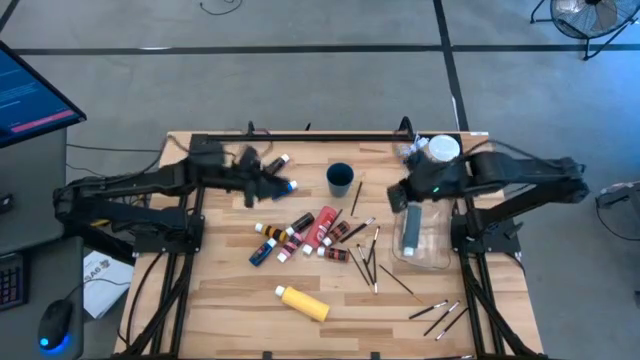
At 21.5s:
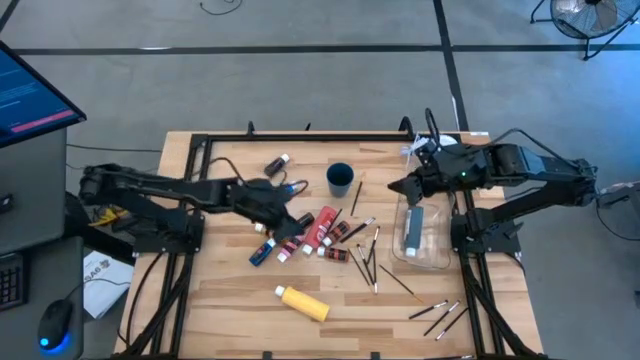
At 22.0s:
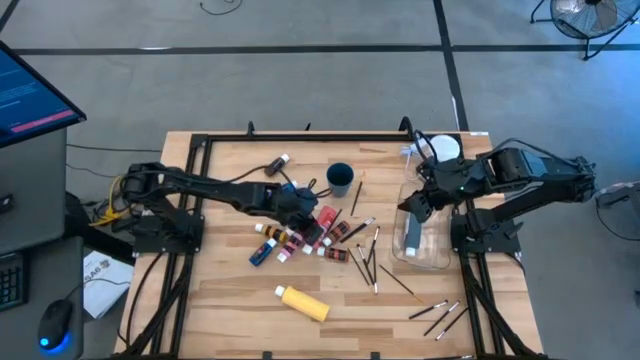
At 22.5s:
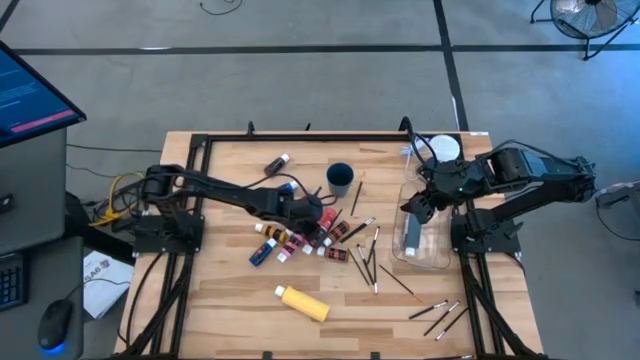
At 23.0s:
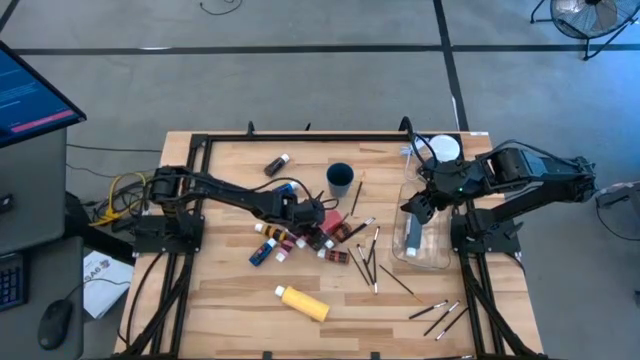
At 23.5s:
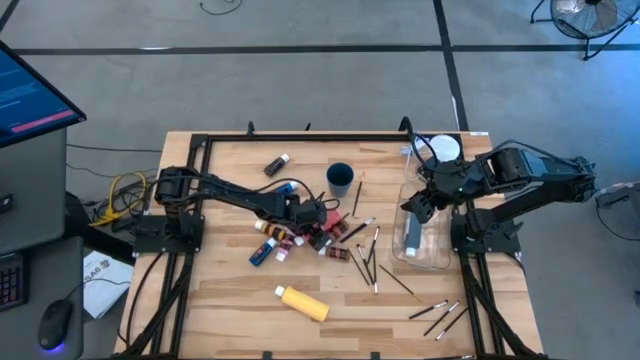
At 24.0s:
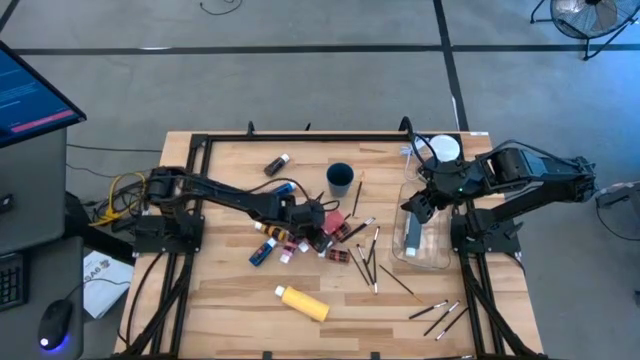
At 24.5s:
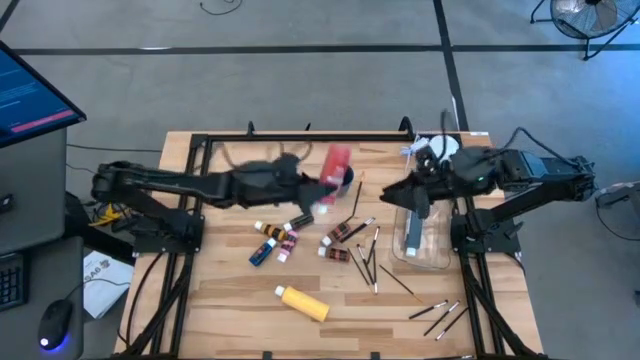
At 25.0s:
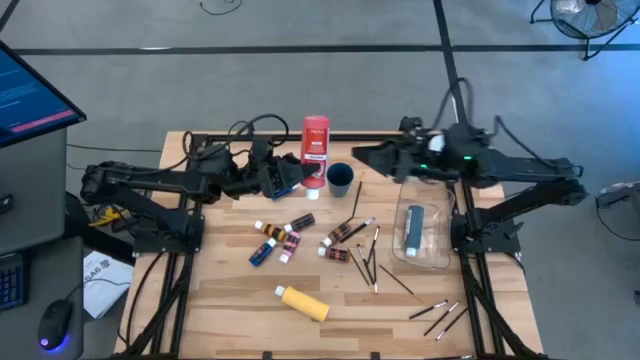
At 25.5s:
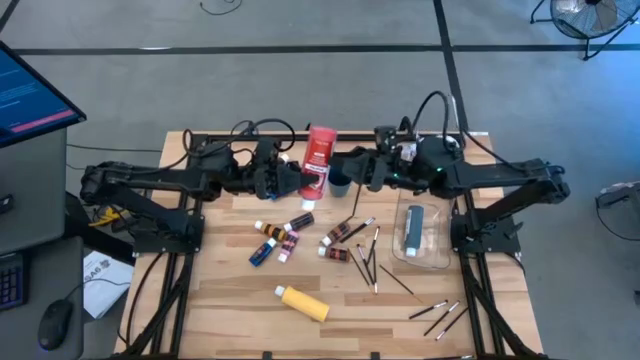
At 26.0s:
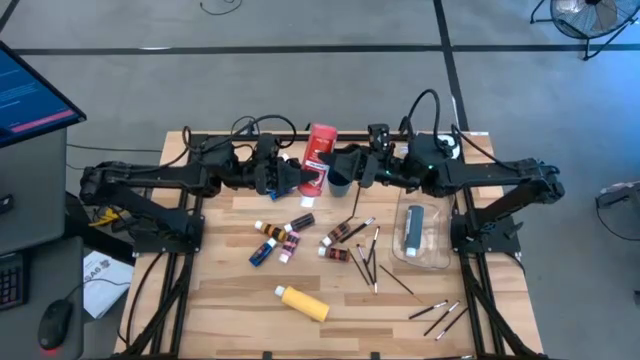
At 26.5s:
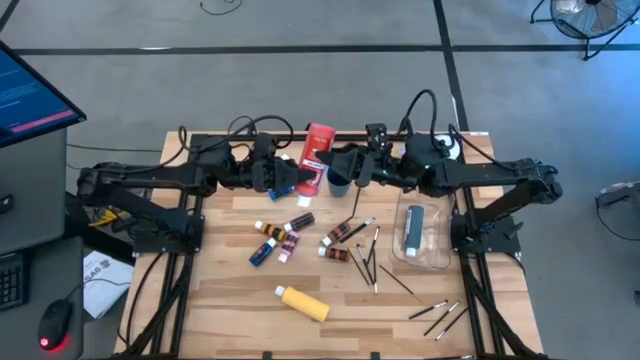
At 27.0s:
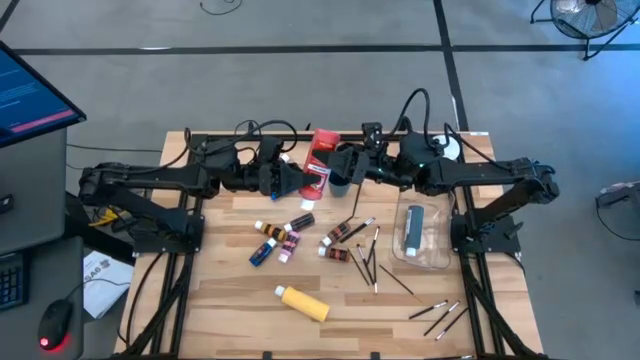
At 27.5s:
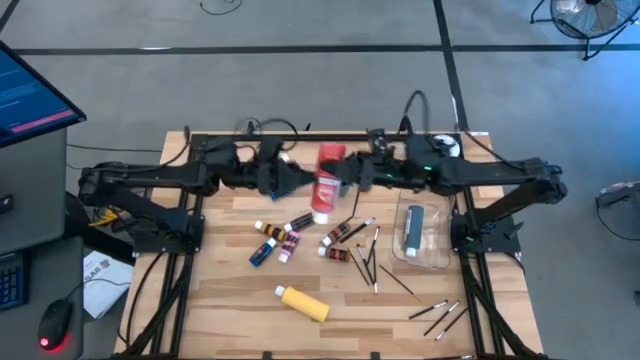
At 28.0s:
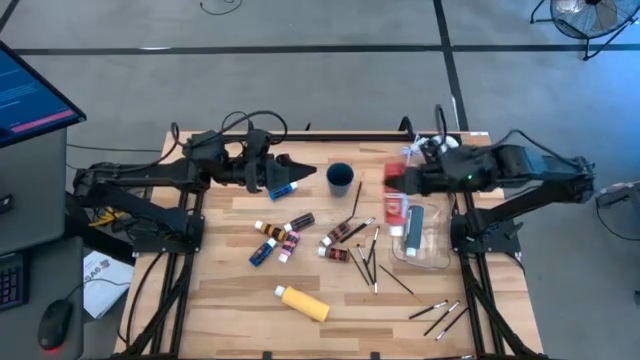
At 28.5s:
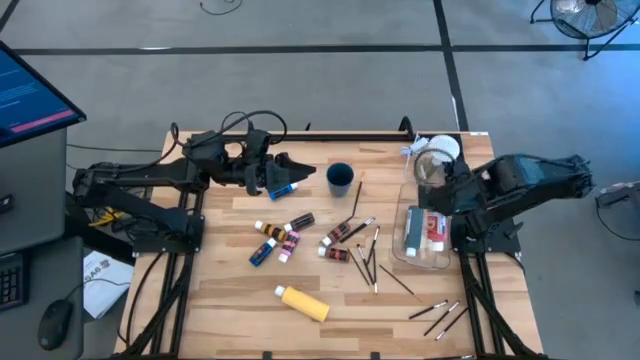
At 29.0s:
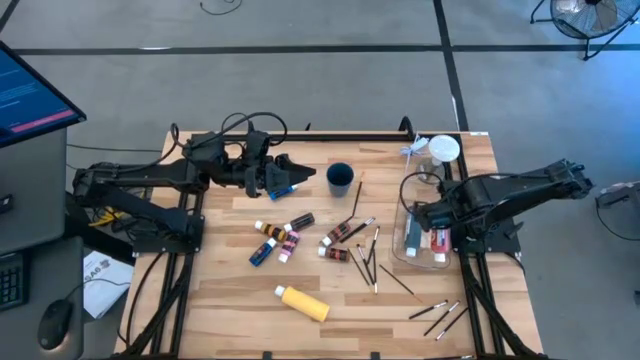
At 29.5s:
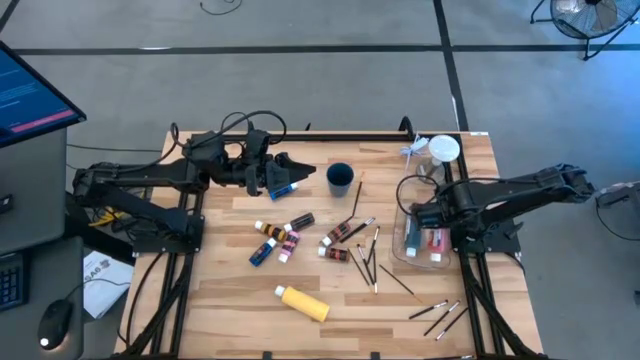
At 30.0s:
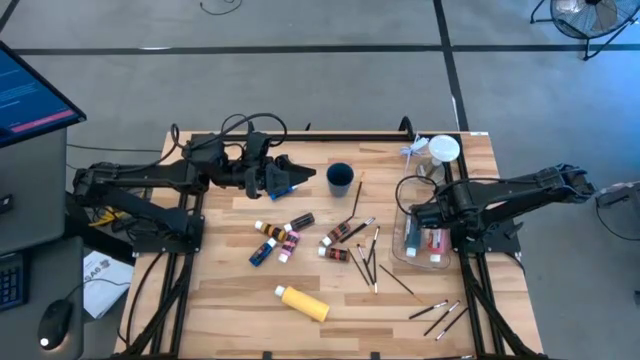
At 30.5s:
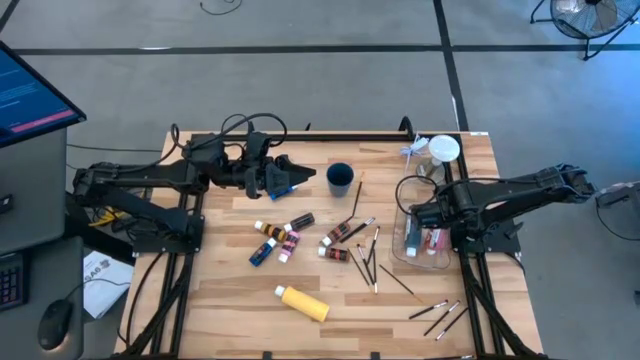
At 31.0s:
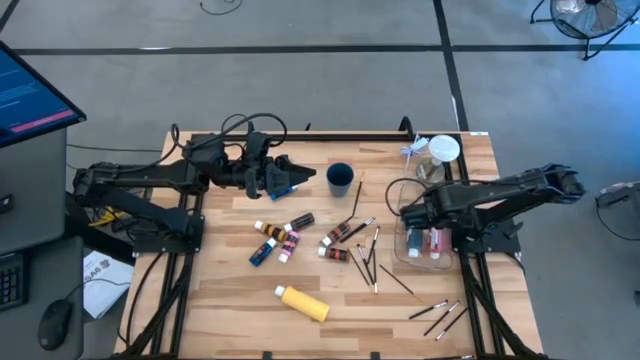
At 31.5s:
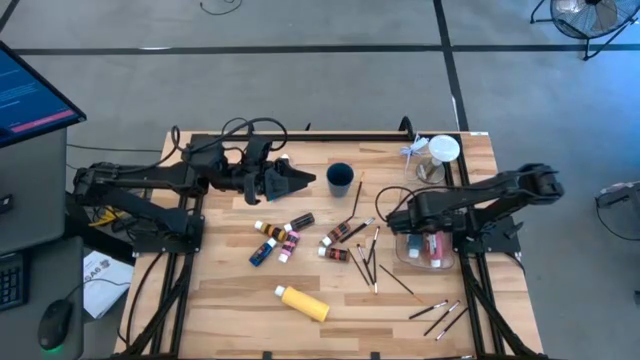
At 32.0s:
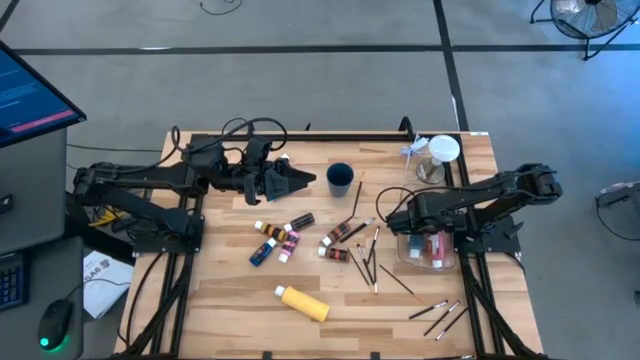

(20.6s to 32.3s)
Task: Pick & Place Paint Supplies
Put the large red paint bottle into the transparent bin

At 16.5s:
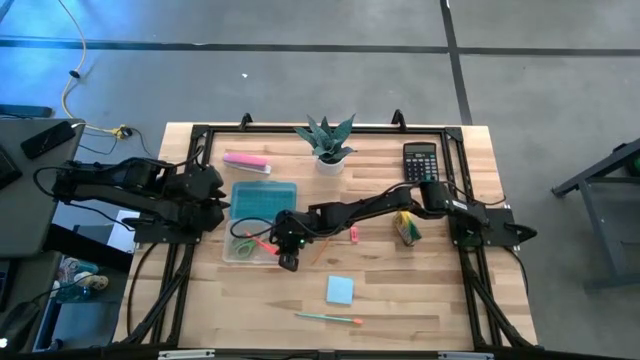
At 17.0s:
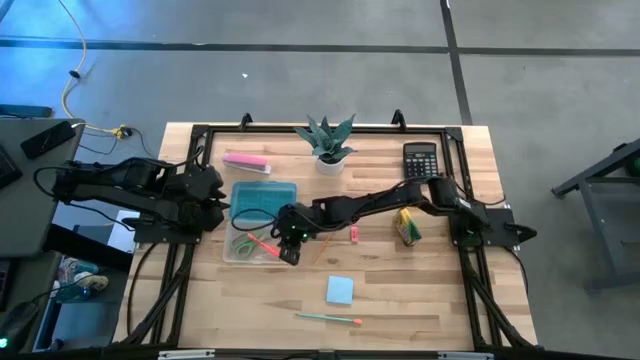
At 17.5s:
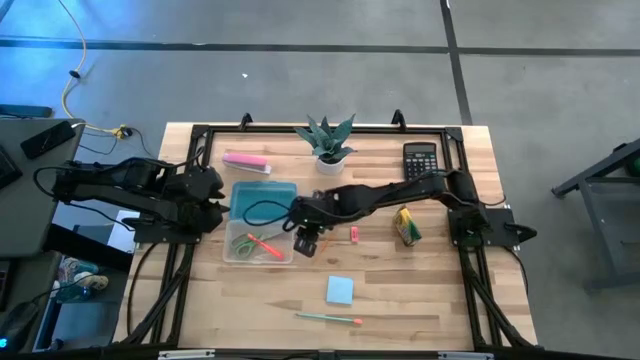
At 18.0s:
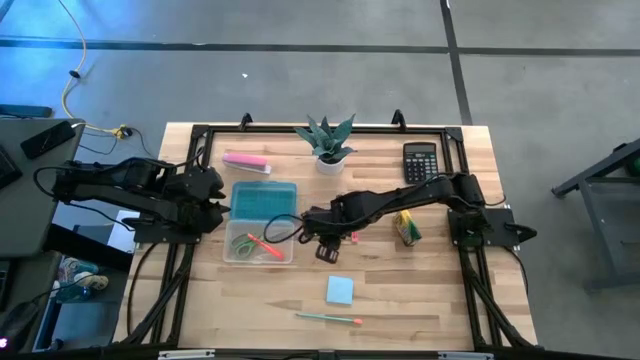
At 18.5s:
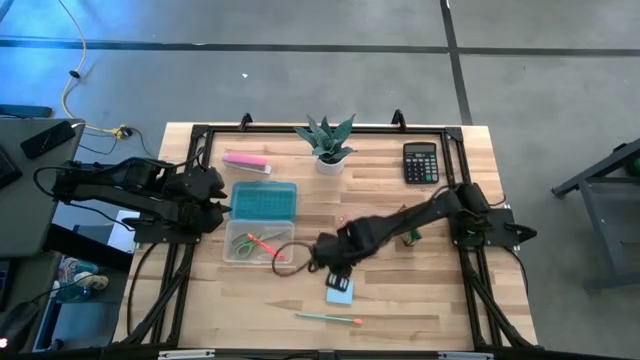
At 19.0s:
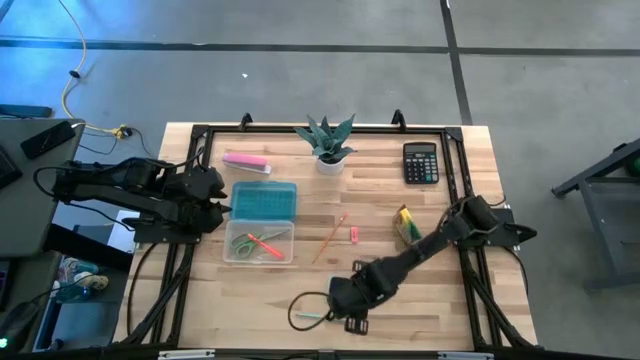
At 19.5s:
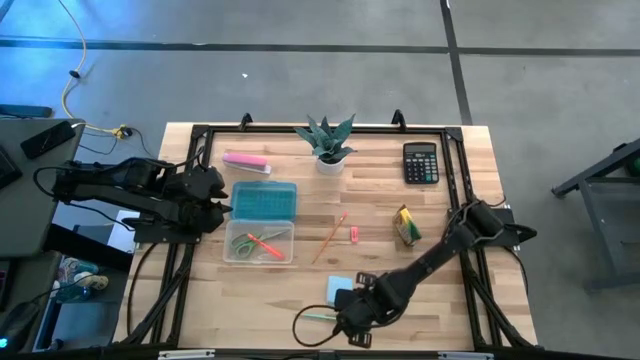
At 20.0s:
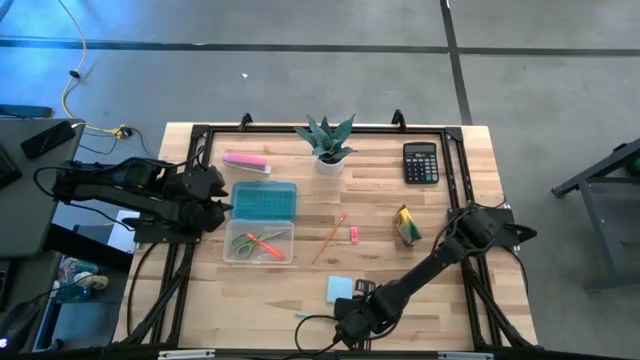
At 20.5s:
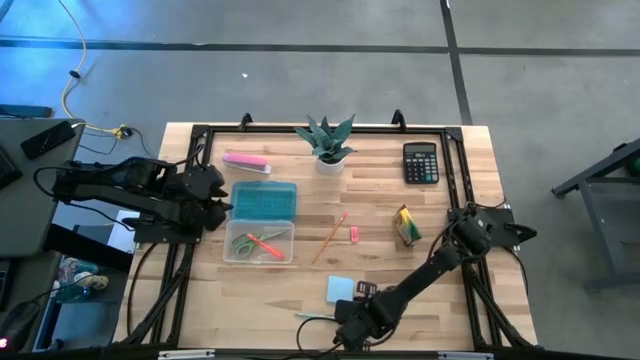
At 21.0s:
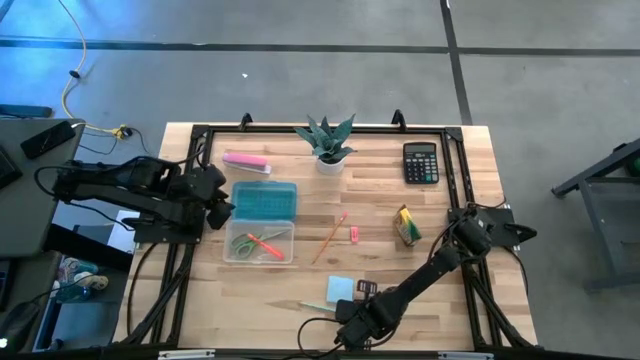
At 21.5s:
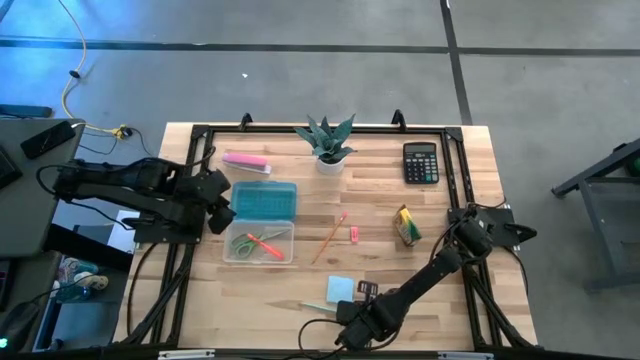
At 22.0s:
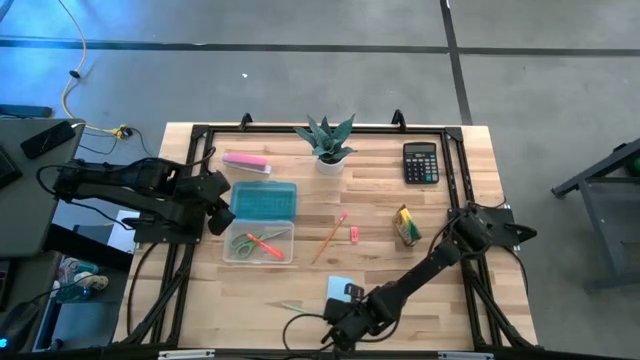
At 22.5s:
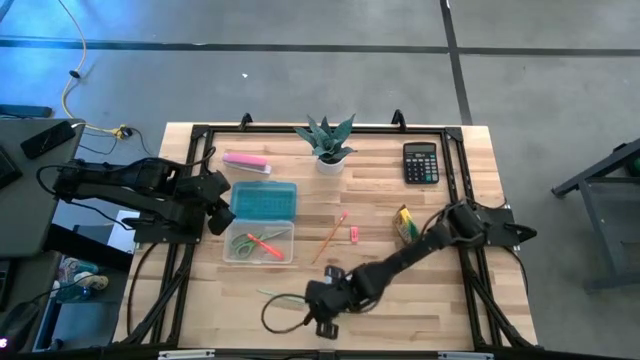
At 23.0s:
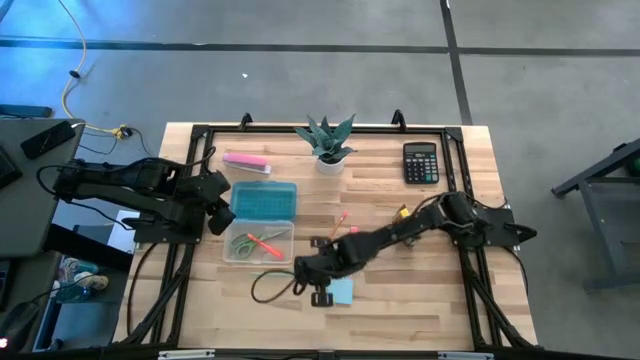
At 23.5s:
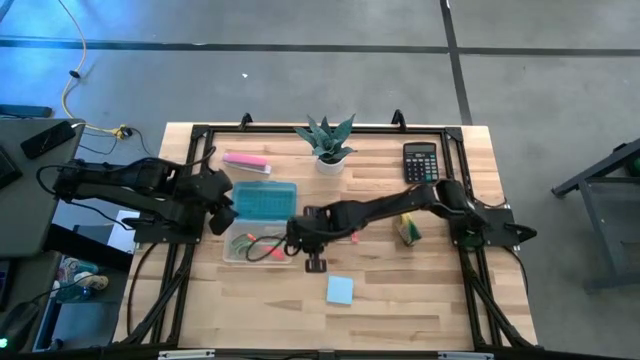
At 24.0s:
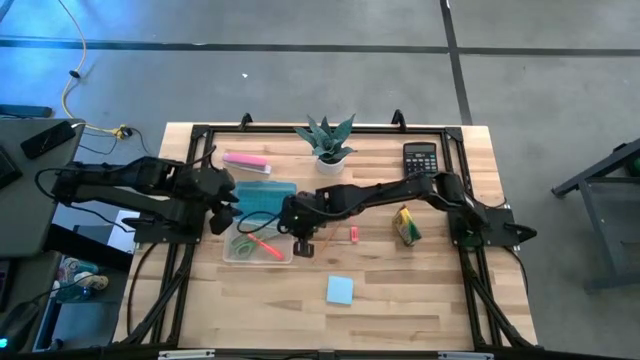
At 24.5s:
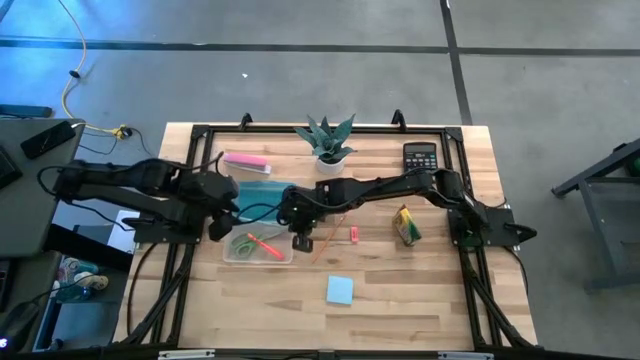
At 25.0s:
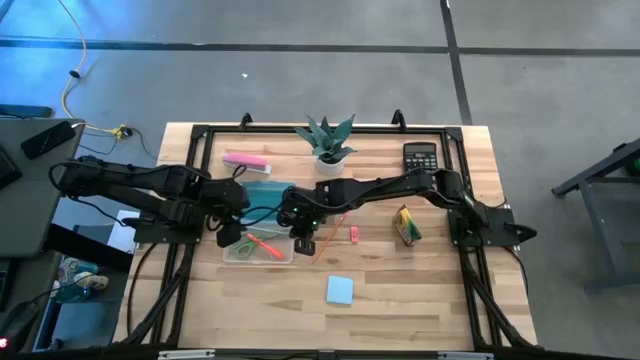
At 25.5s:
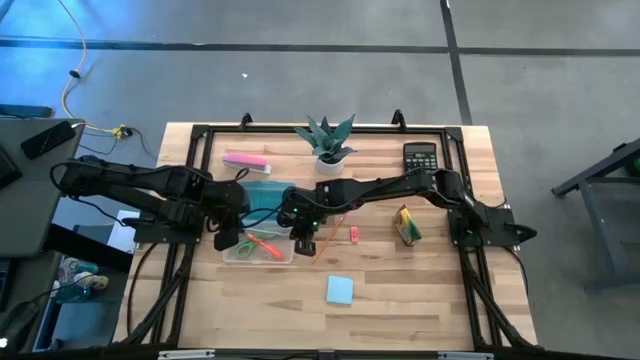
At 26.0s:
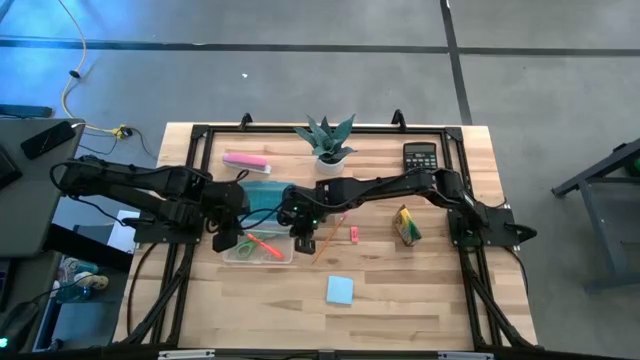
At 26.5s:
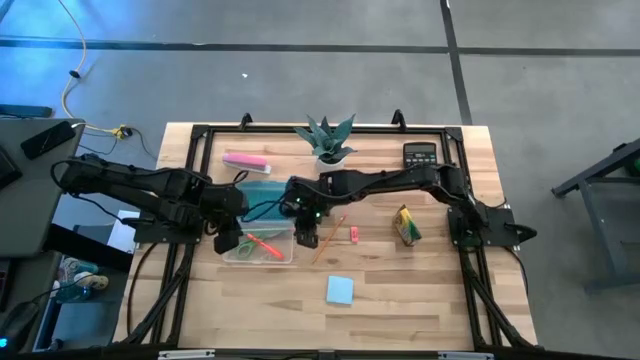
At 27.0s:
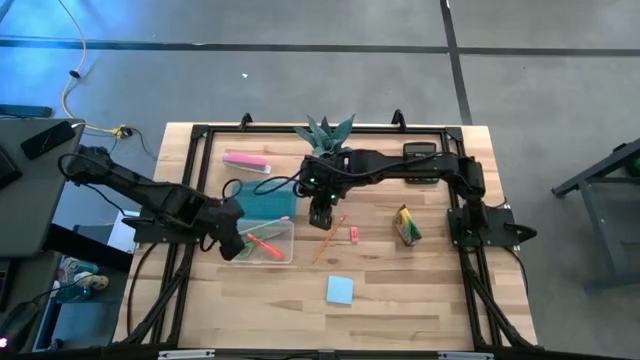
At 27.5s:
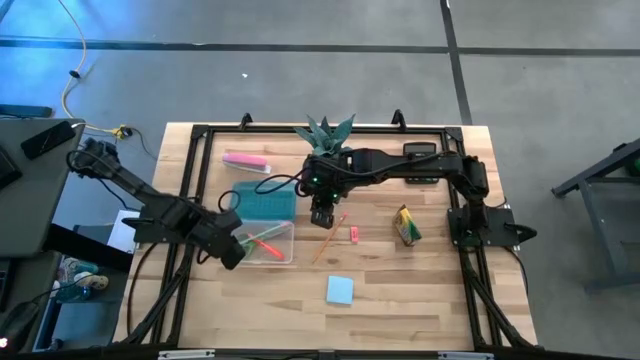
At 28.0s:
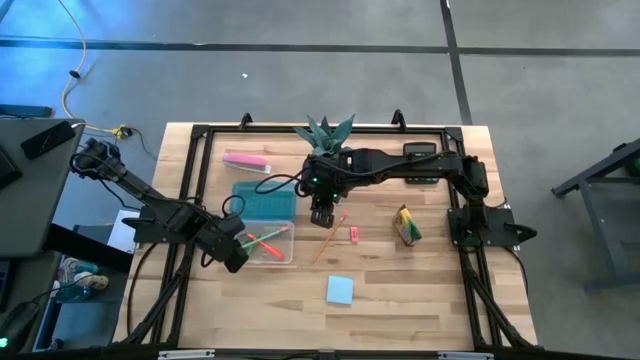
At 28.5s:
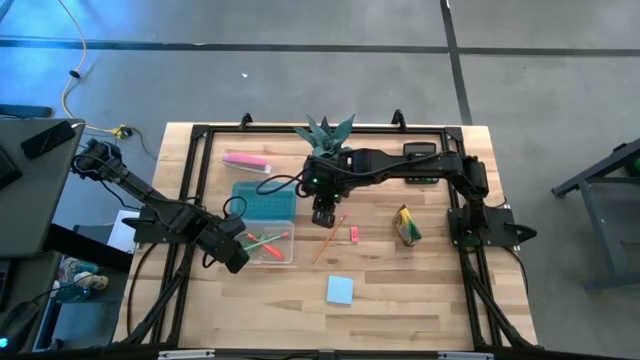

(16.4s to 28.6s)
Task: Pack school essentials
Put the light blue pencil into the blue supply box
